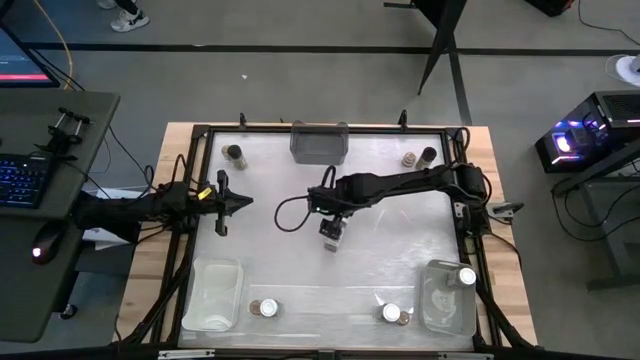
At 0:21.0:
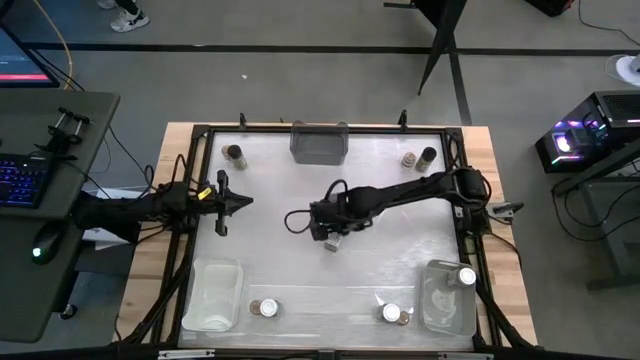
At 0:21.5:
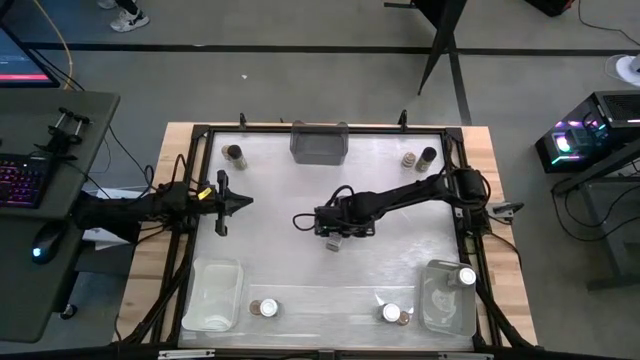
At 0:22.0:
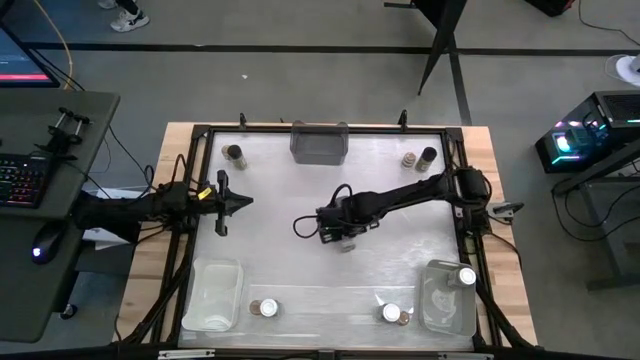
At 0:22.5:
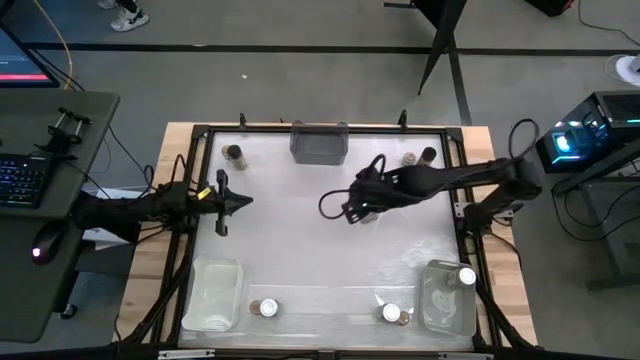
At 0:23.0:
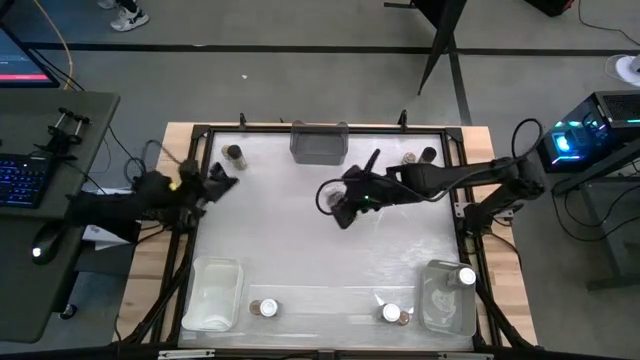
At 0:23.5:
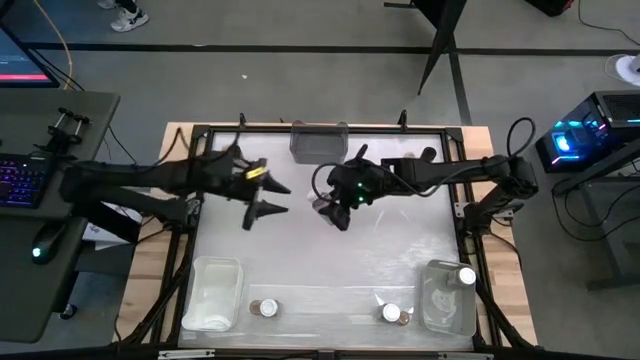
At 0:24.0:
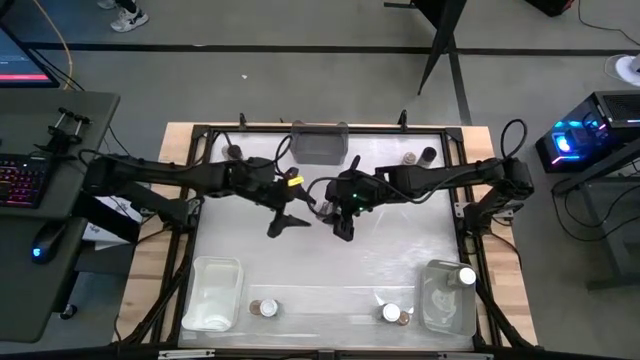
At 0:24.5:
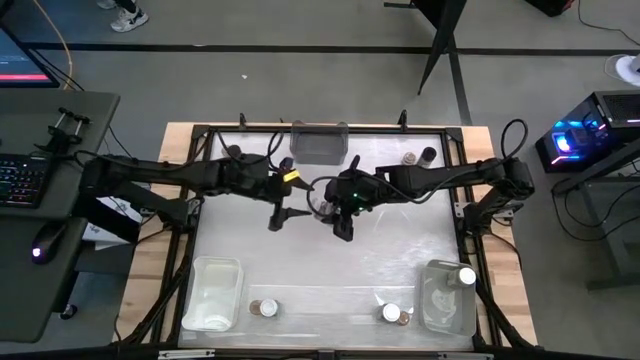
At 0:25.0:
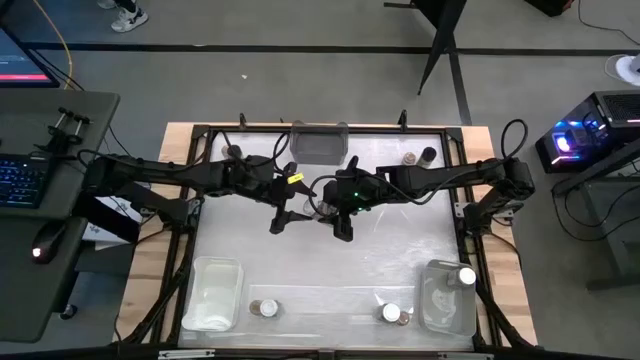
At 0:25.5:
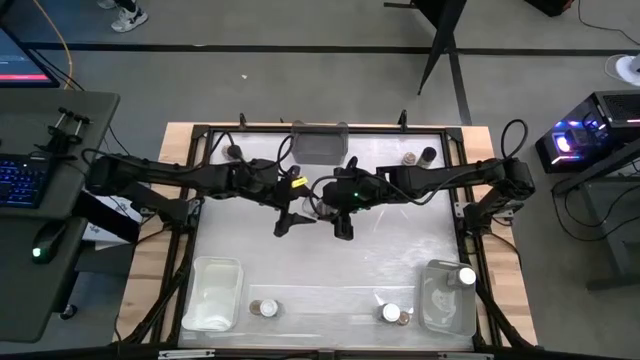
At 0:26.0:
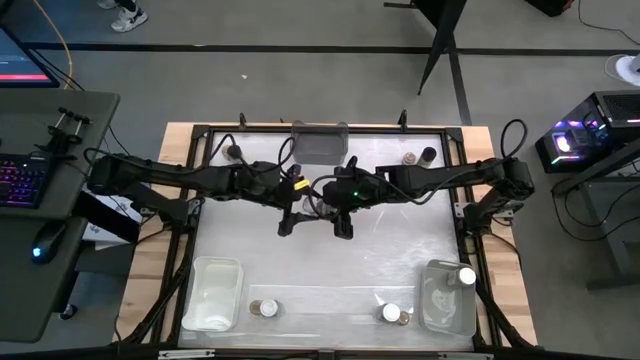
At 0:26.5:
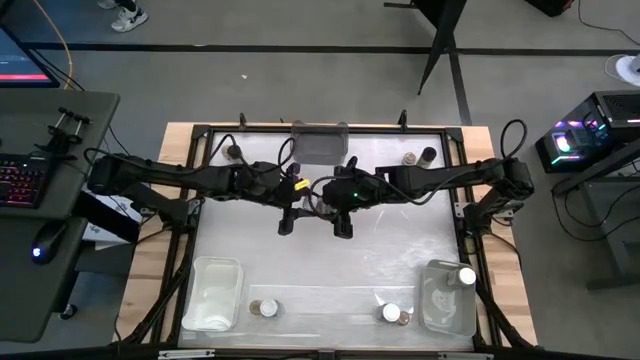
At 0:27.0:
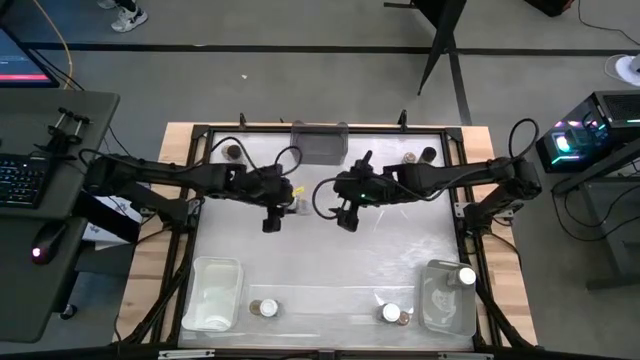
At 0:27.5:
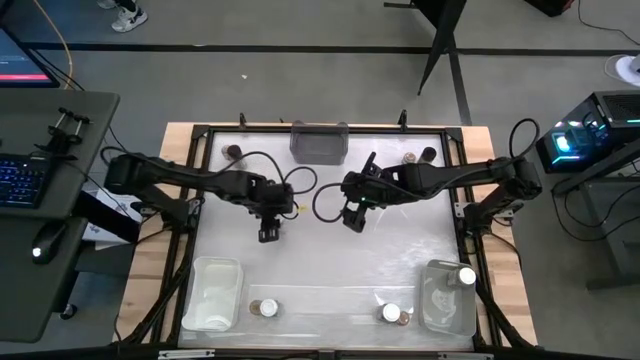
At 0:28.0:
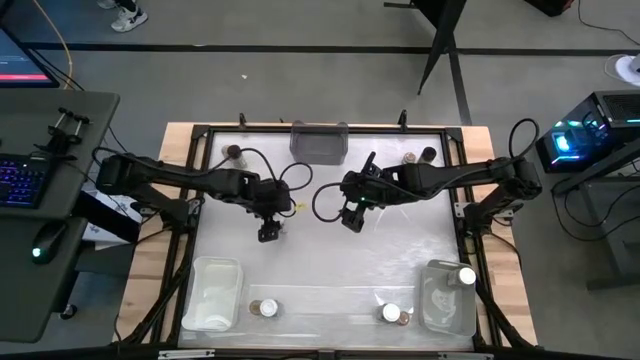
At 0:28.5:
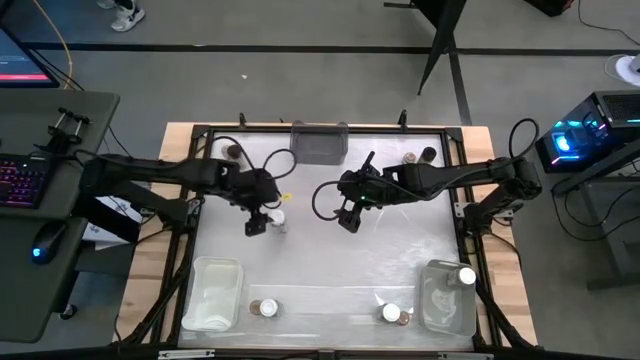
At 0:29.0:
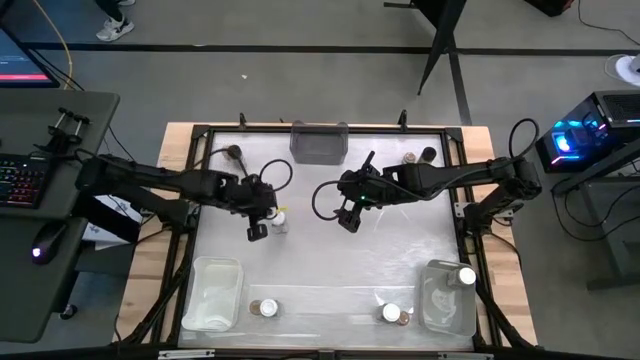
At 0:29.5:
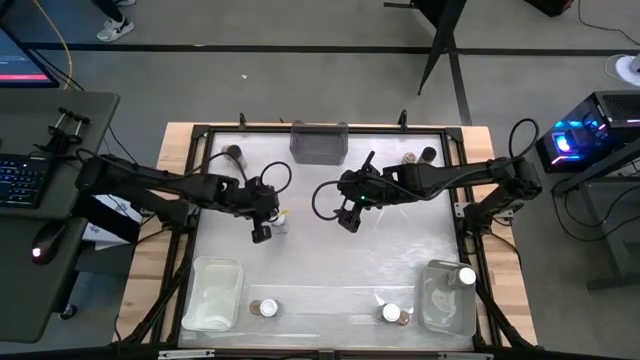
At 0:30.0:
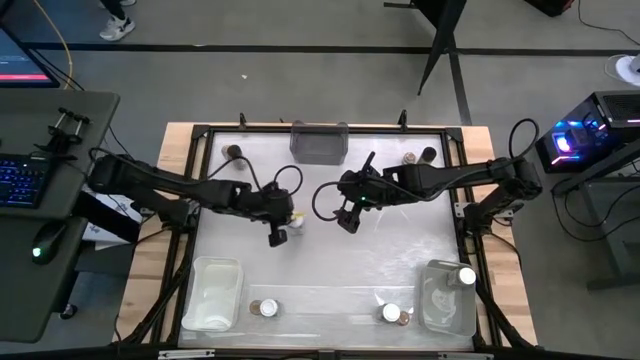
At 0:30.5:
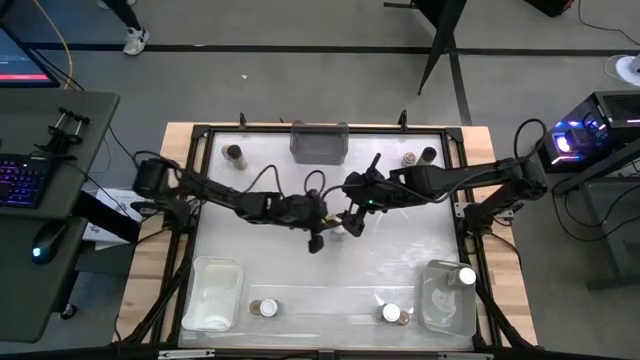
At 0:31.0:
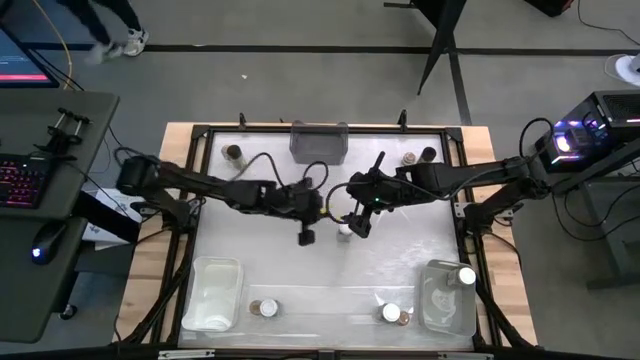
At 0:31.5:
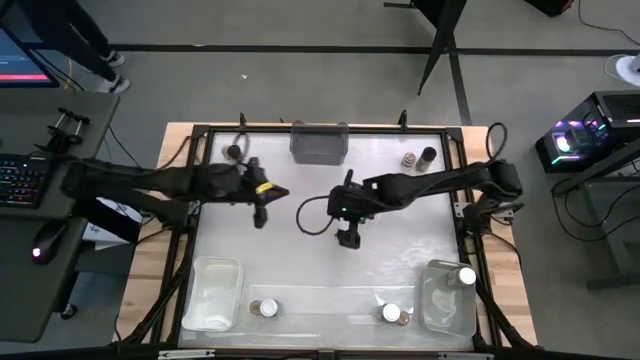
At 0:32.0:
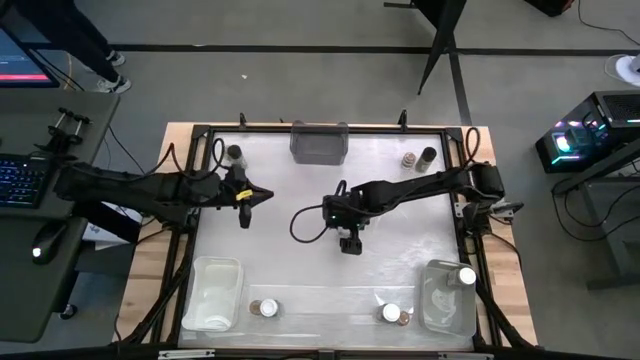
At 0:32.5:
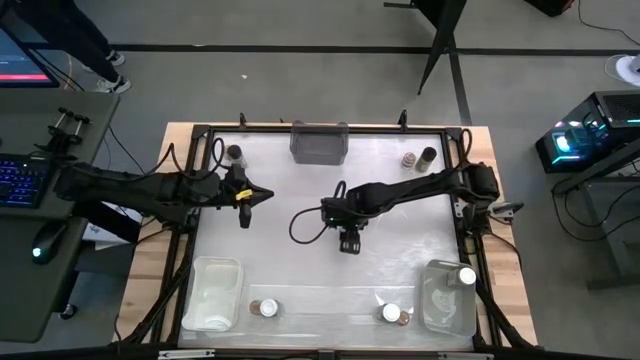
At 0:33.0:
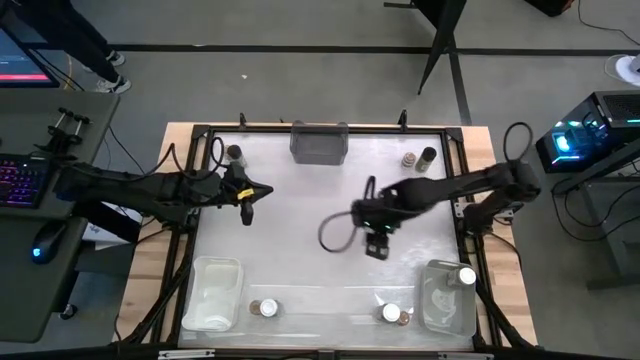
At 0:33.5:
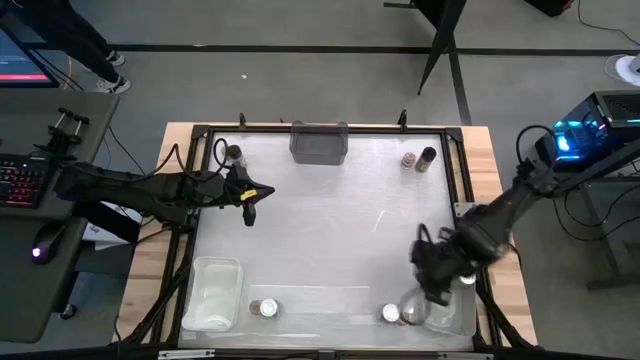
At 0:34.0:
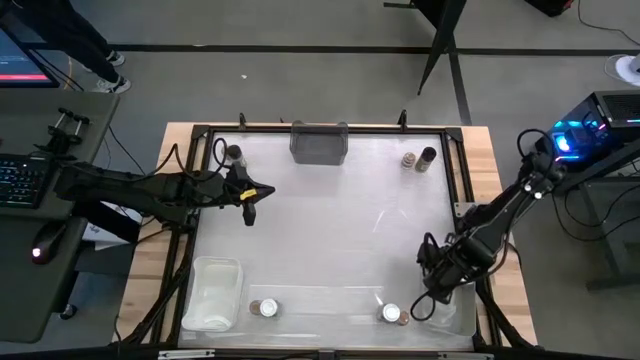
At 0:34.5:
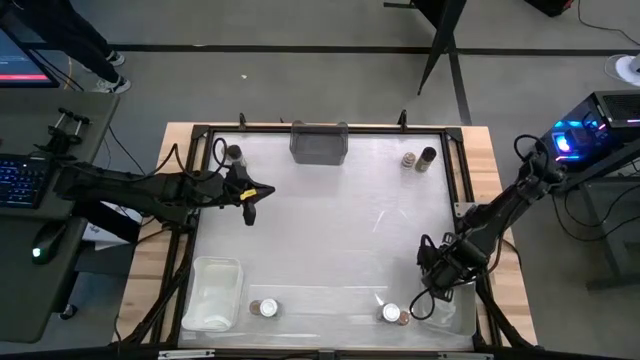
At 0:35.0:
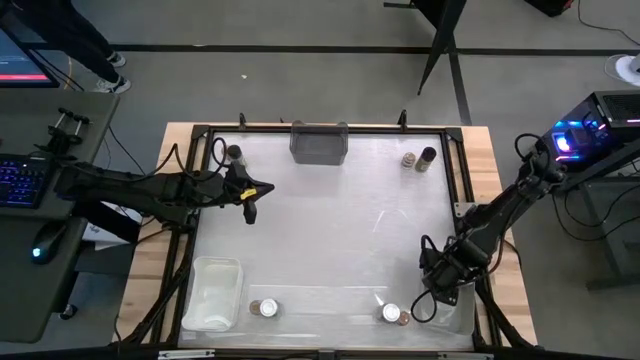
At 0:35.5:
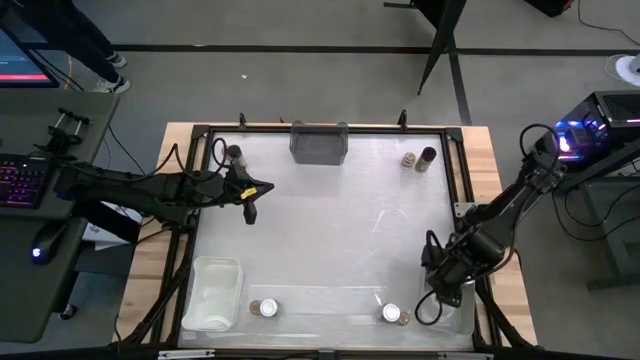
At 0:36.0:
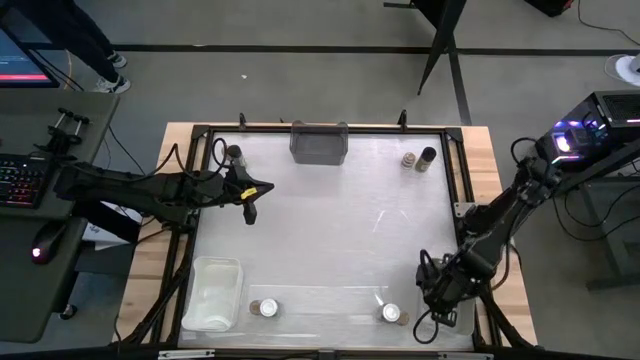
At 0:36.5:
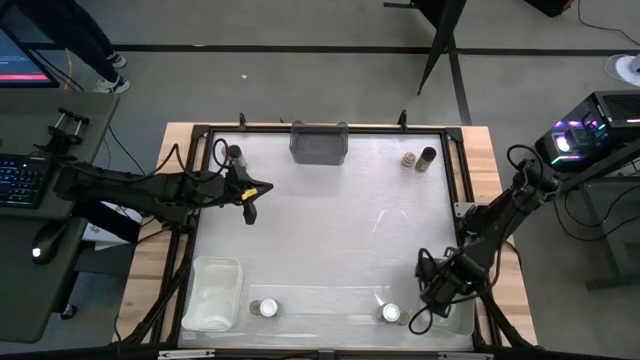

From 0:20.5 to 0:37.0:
Task: Sort spices by type
Put the top white seasoning bottle into the gray bin

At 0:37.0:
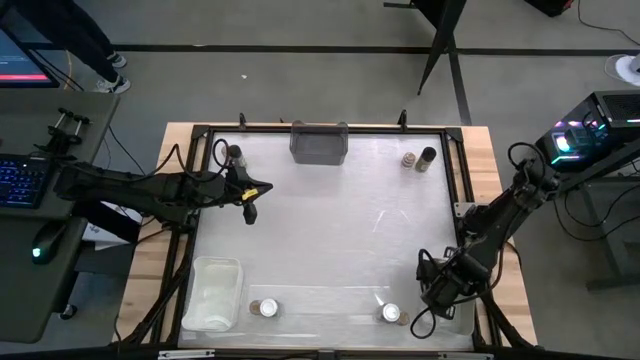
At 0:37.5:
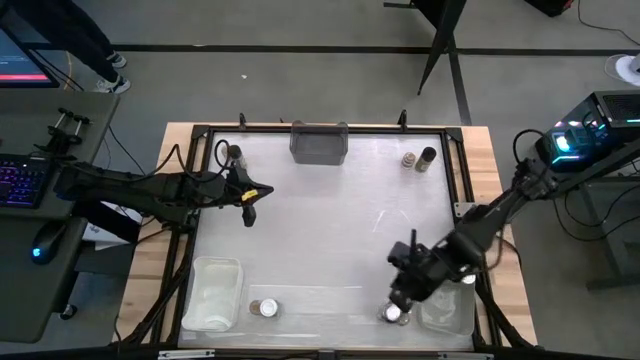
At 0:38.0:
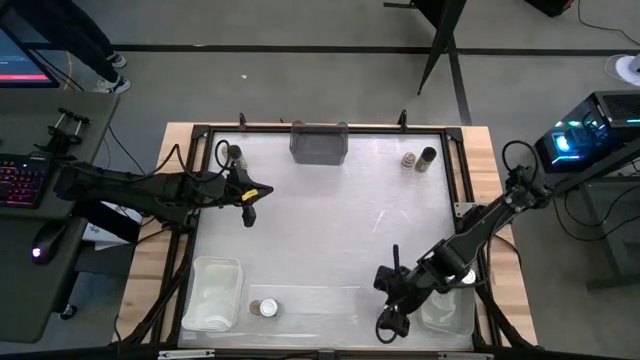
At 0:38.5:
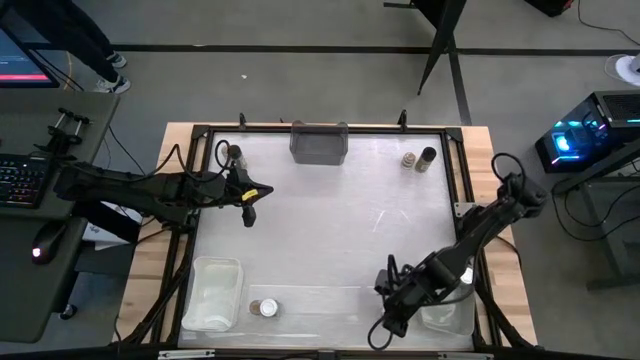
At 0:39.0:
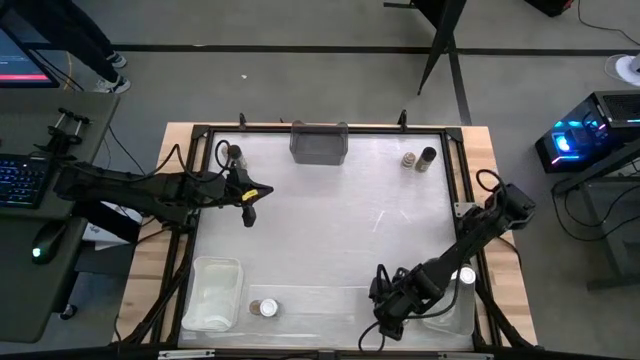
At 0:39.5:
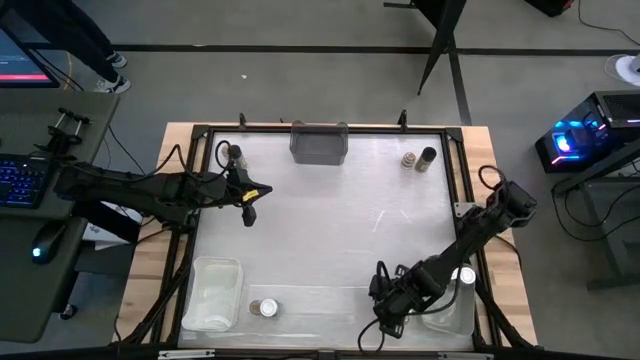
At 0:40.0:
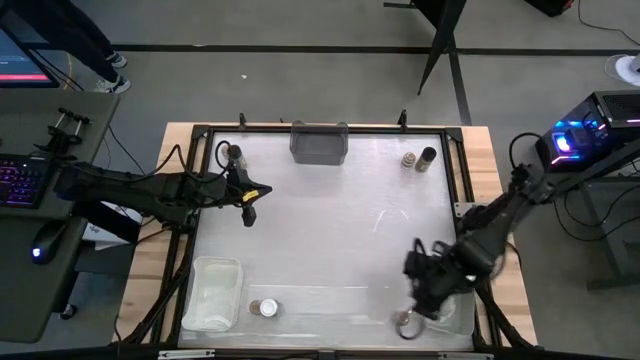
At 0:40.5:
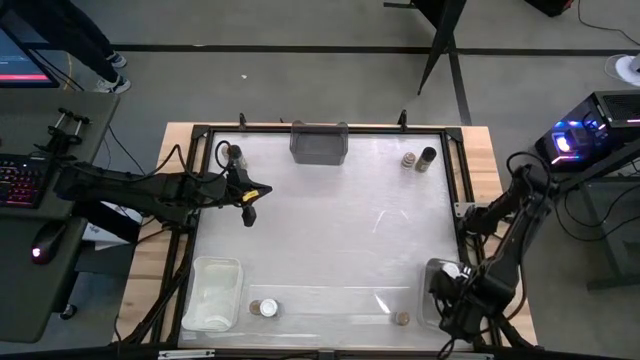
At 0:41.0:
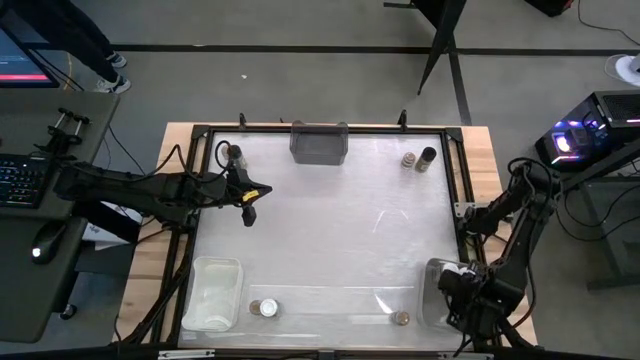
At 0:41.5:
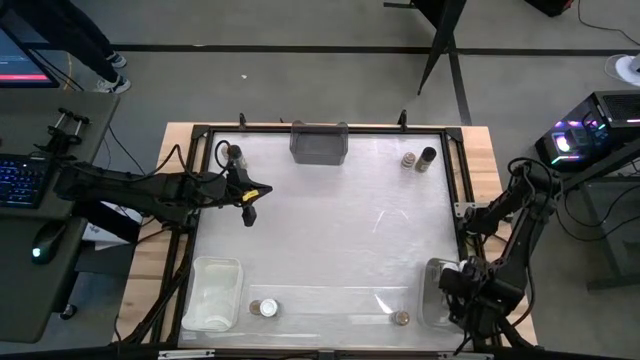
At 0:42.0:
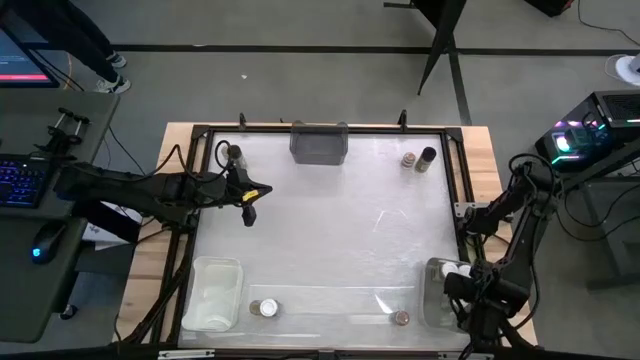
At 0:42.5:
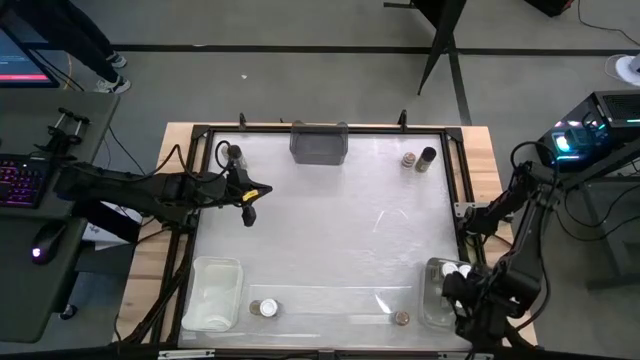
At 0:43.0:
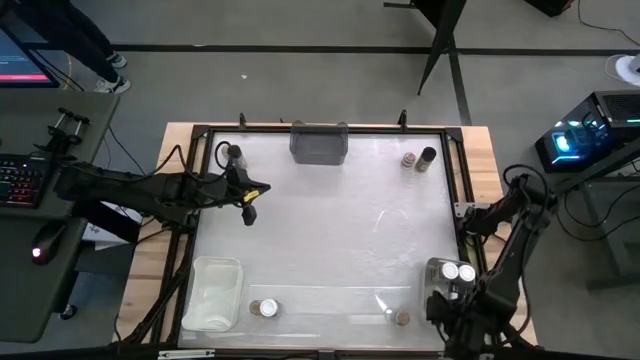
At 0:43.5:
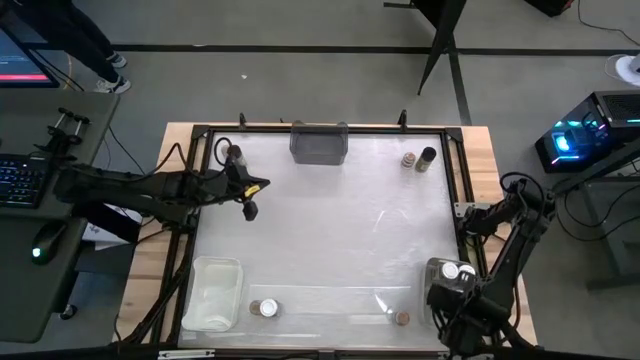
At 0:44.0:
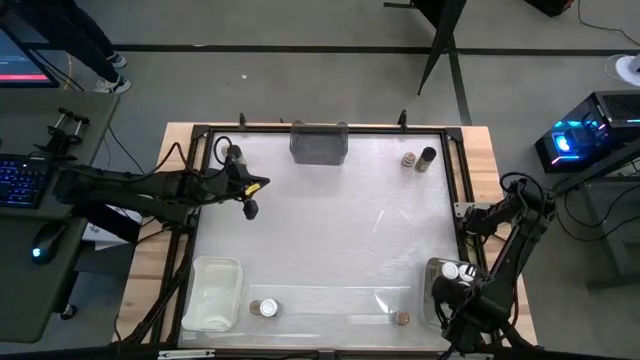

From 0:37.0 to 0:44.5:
Put the right white seasoning bottle into the gray bin
